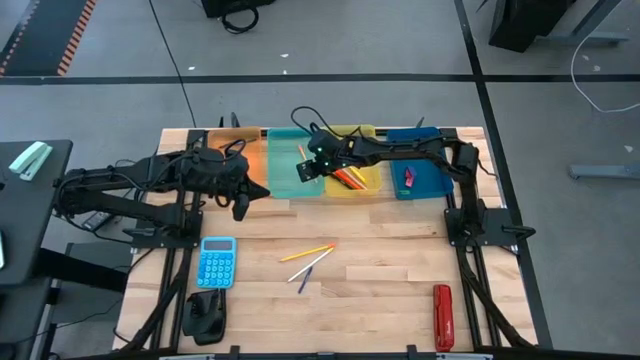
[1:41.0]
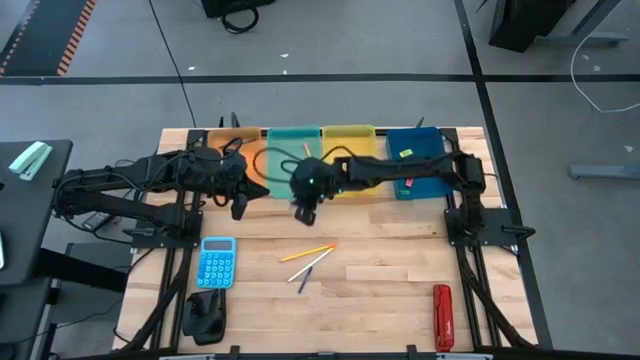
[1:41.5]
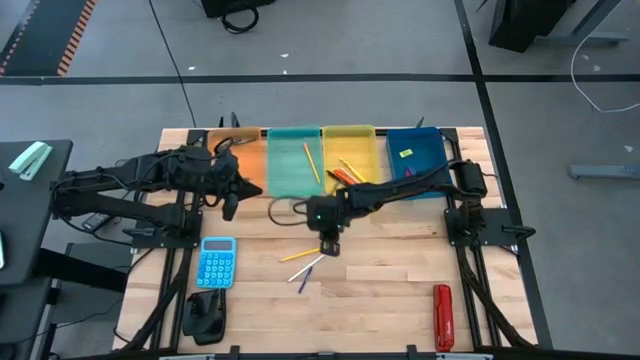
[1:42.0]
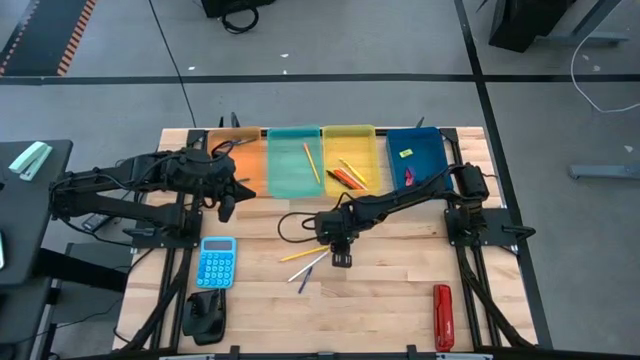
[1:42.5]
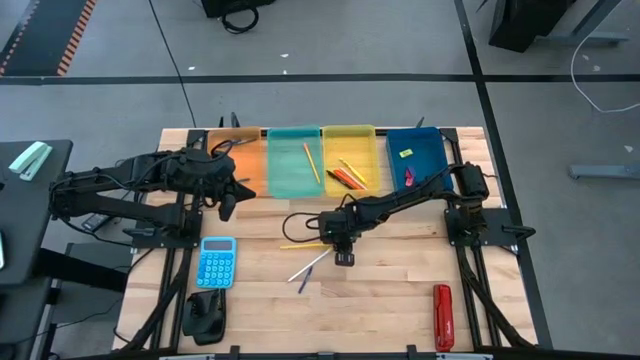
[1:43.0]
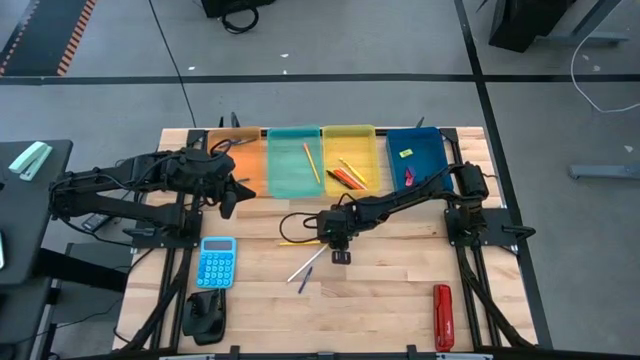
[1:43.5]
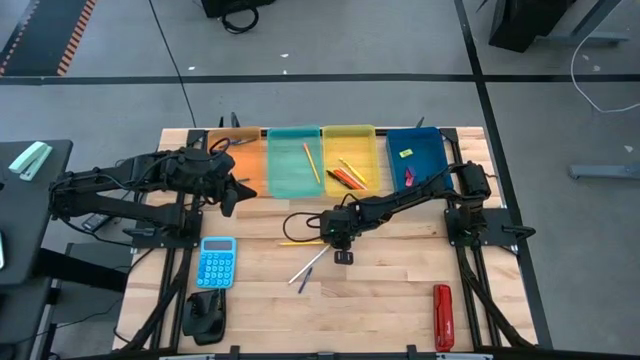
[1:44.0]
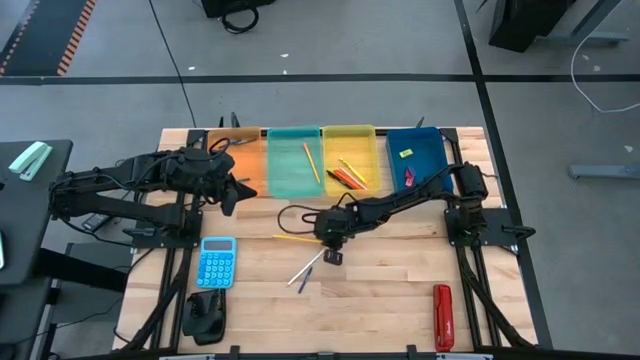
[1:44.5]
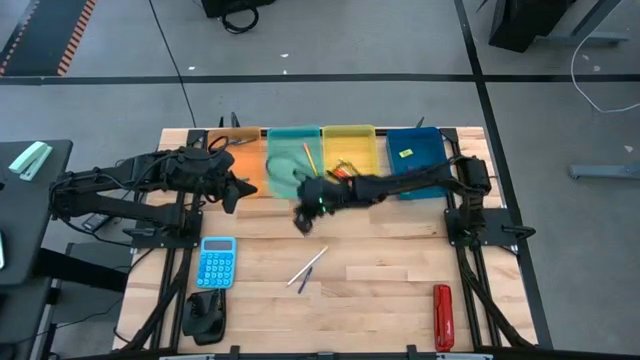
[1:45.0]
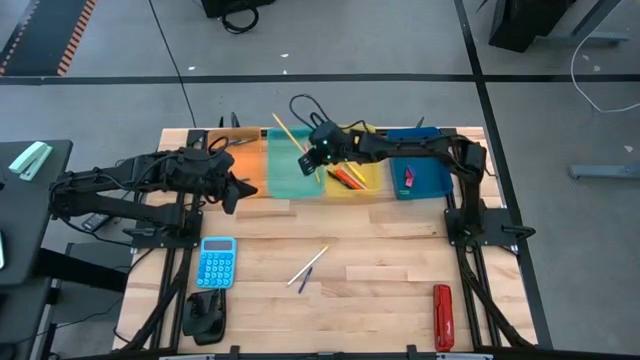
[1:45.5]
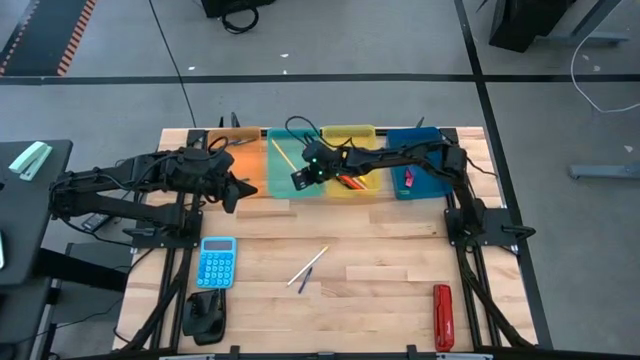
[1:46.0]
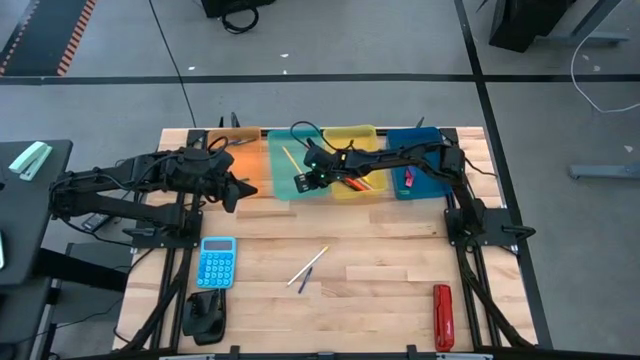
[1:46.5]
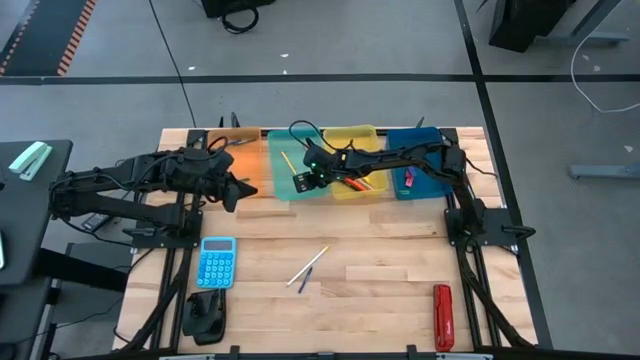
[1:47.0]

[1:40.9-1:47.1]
Task: Sort crayons/erasers/pens/pencils in bins
Put the yellow pencil into the green bin

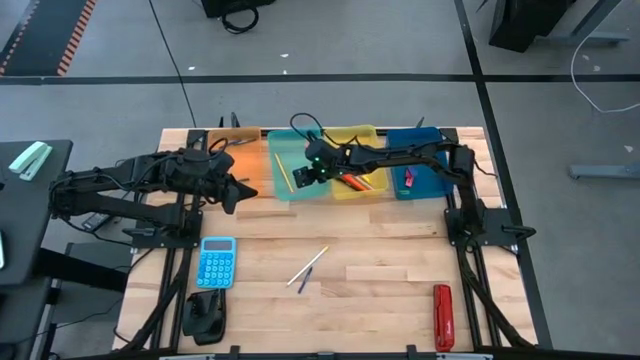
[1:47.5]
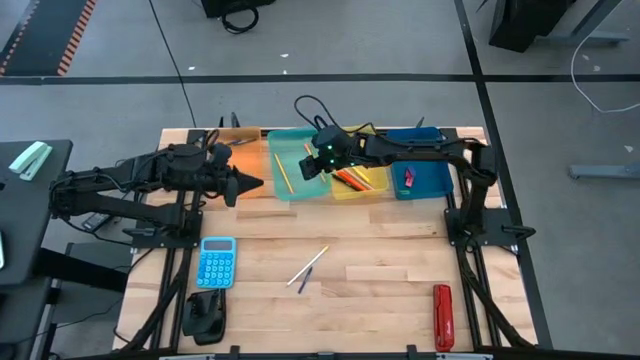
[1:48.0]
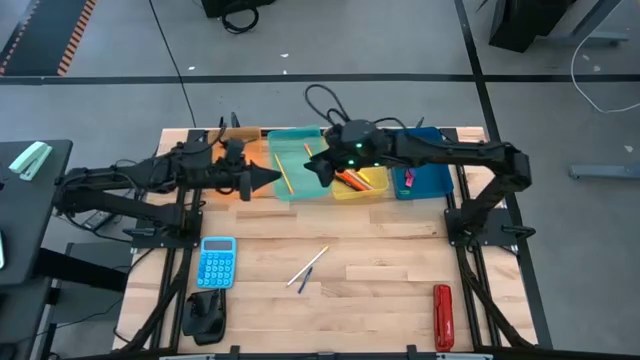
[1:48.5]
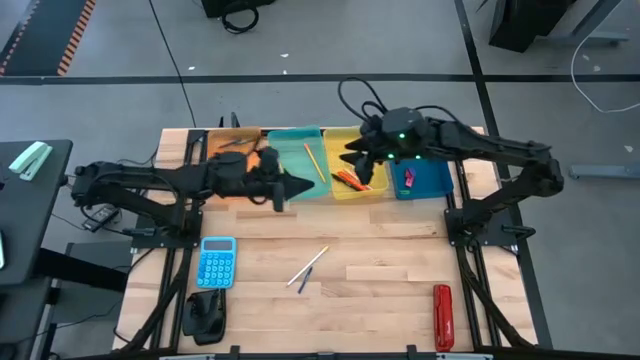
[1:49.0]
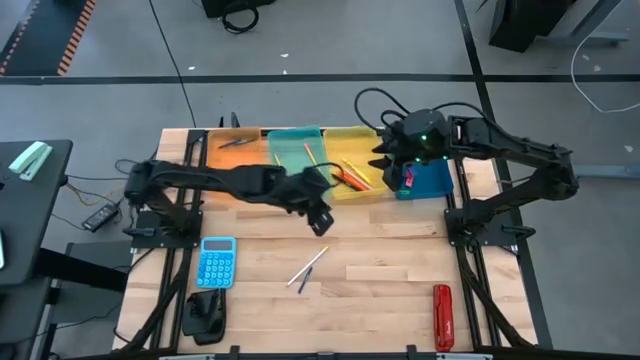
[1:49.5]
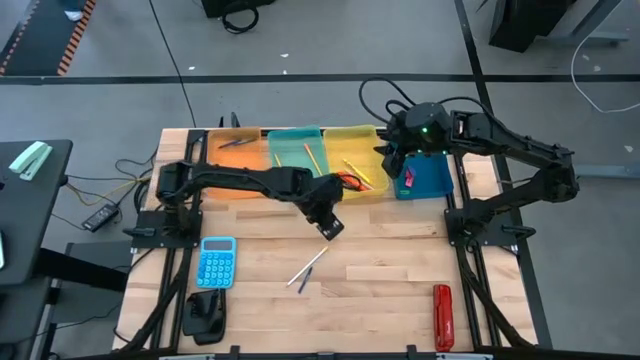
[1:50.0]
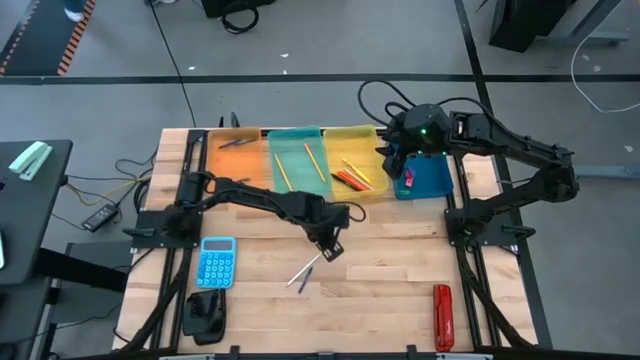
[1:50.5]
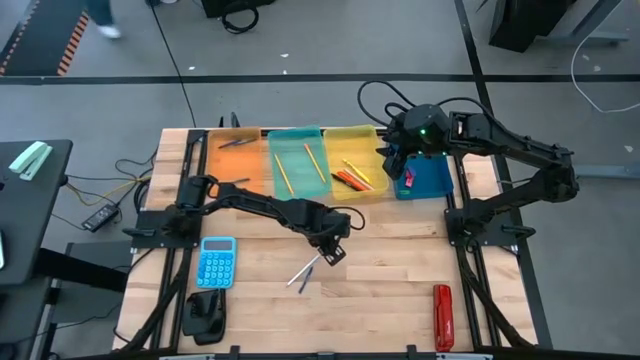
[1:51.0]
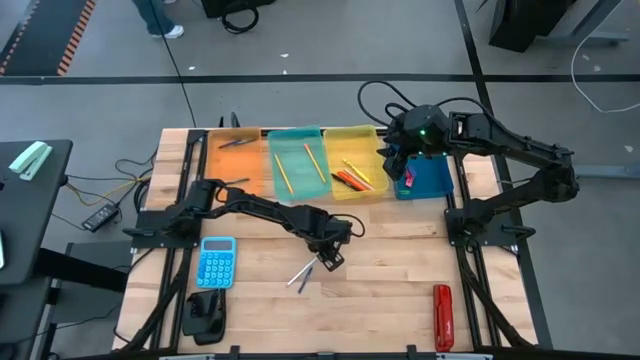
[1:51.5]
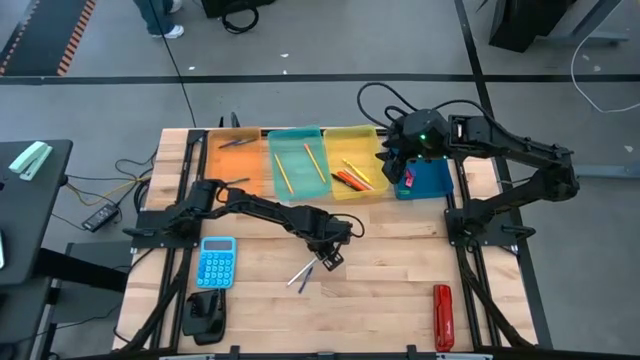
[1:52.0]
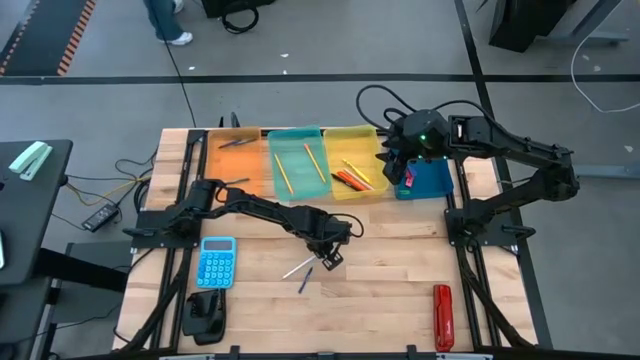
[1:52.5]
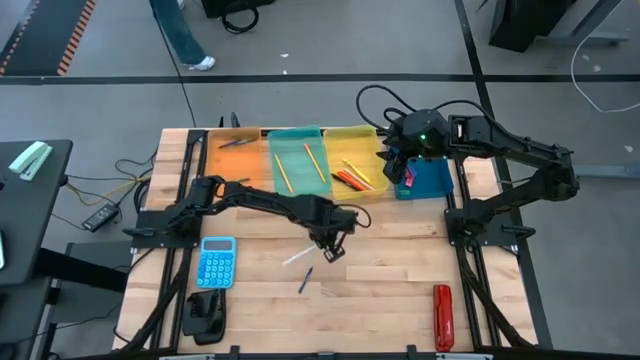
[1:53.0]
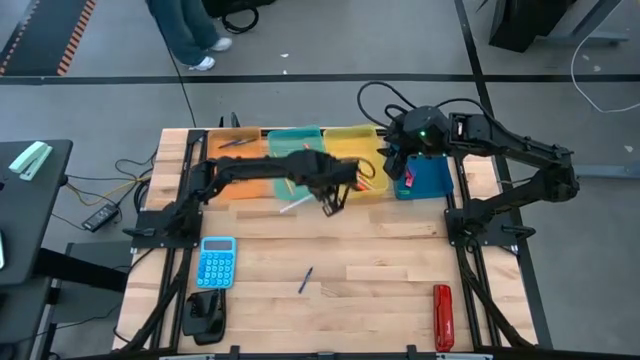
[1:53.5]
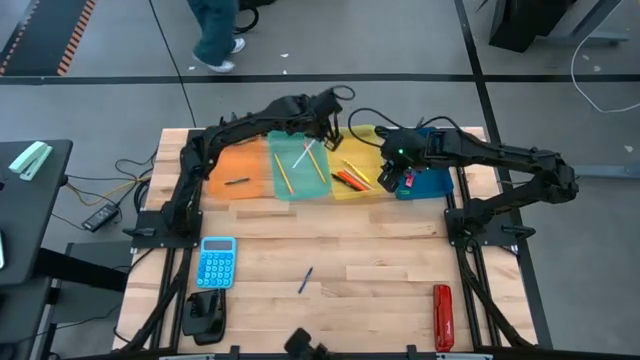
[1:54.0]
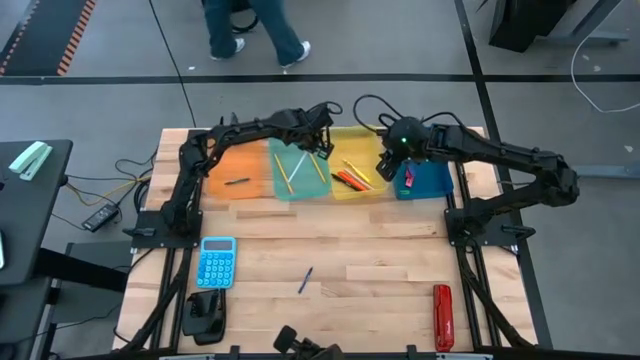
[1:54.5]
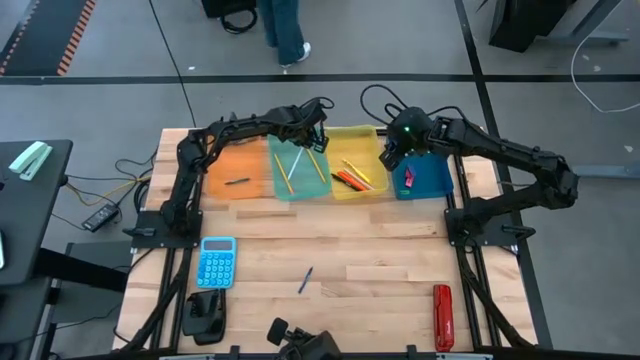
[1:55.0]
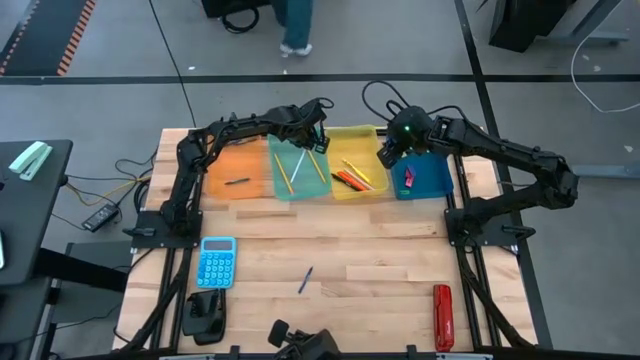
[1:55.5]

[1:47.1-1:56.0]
Put the white pencil into the green bin

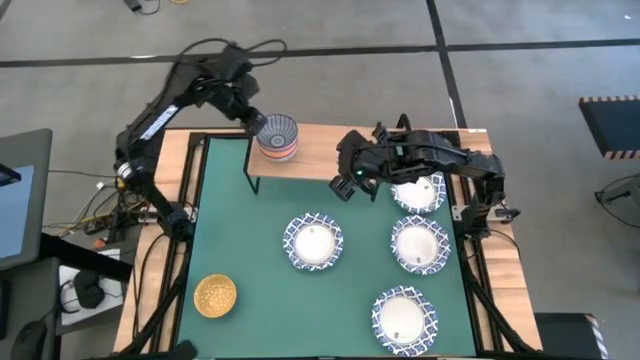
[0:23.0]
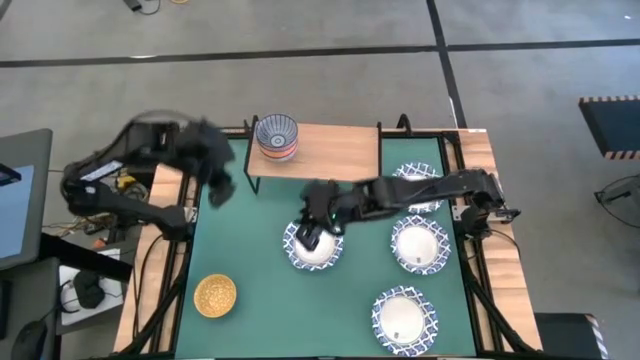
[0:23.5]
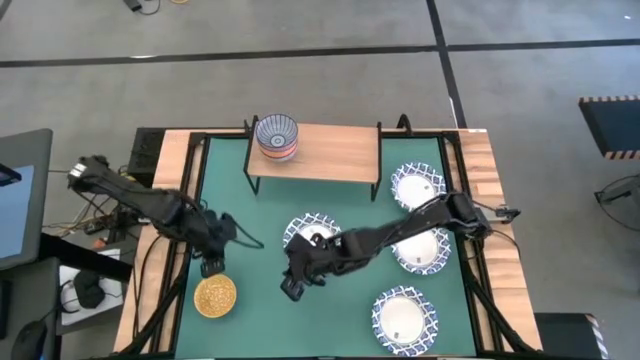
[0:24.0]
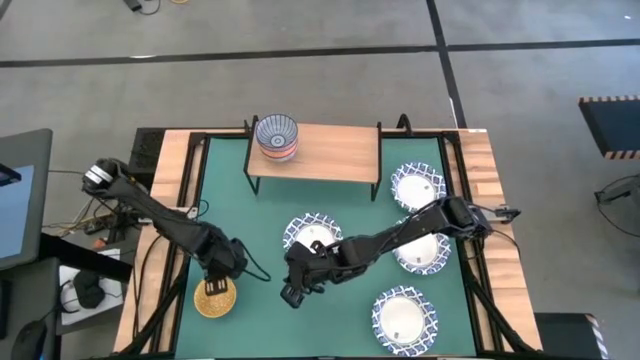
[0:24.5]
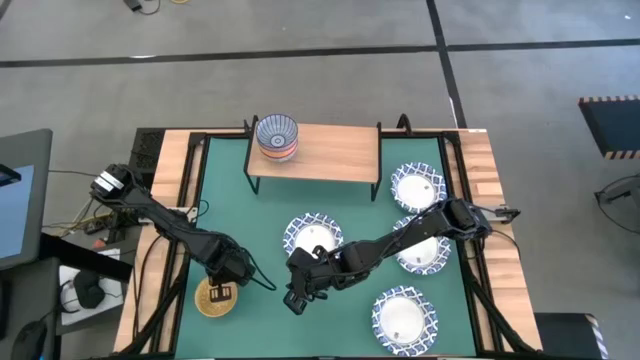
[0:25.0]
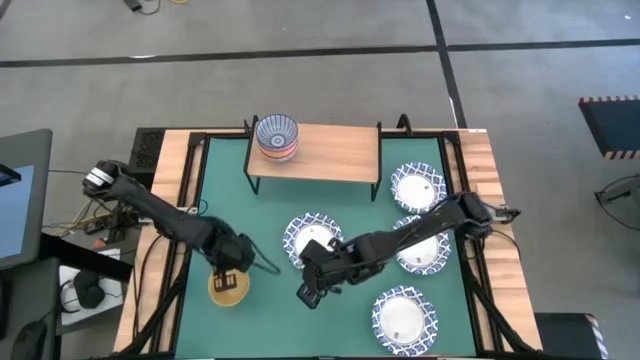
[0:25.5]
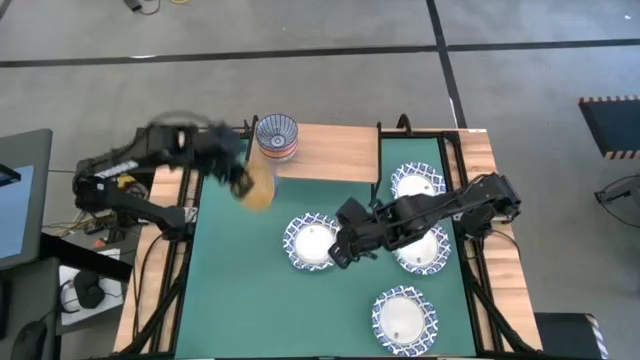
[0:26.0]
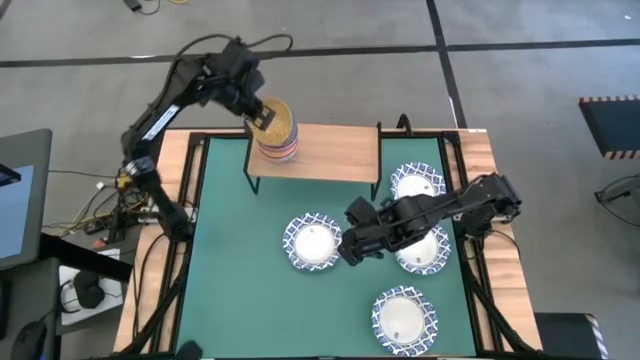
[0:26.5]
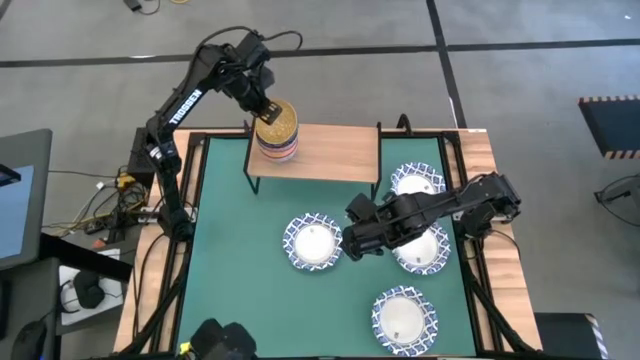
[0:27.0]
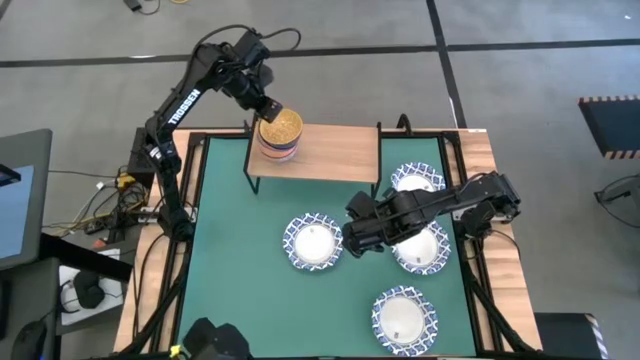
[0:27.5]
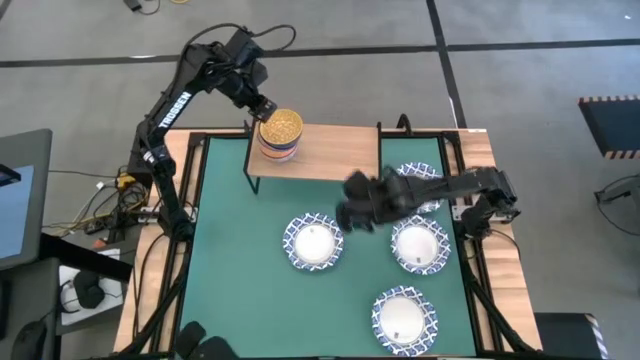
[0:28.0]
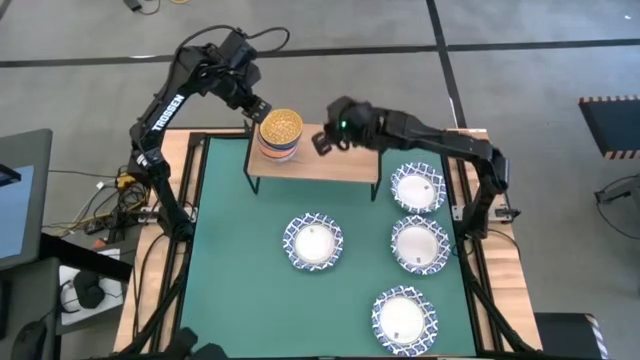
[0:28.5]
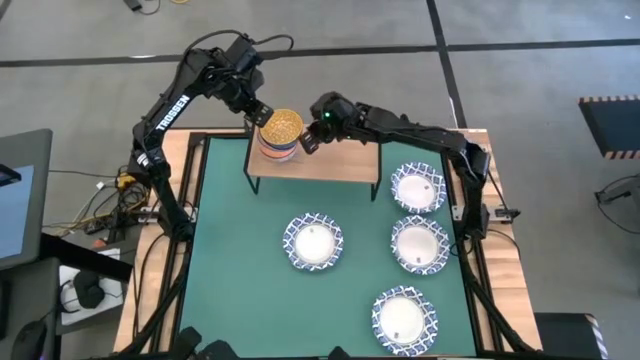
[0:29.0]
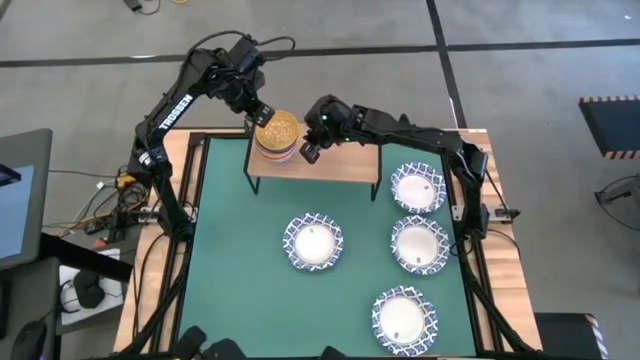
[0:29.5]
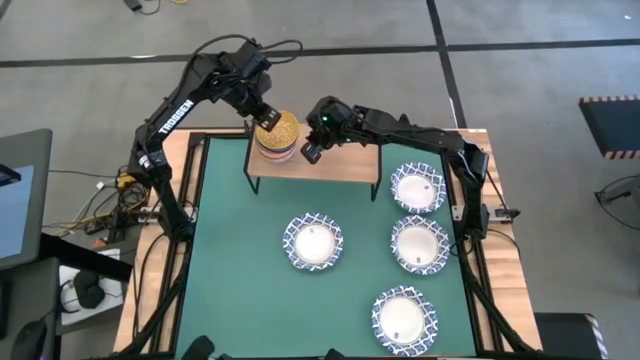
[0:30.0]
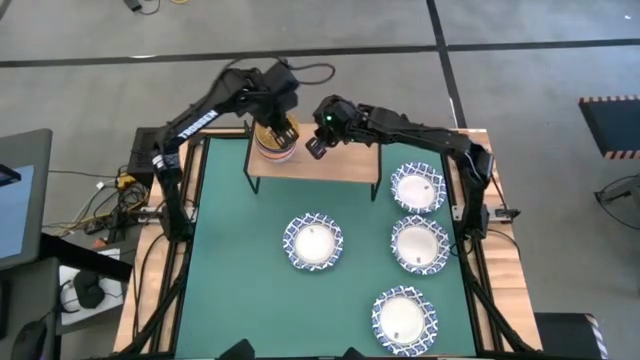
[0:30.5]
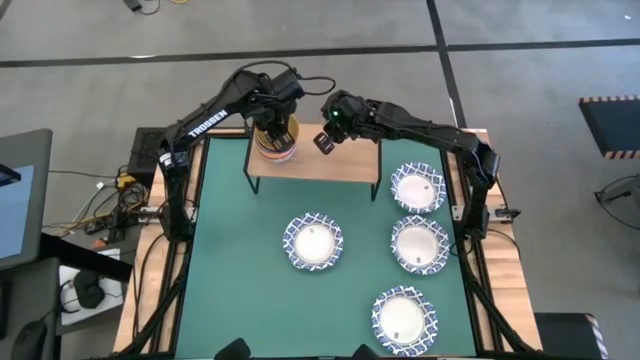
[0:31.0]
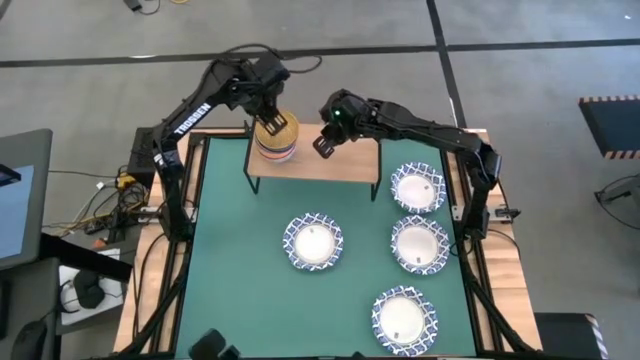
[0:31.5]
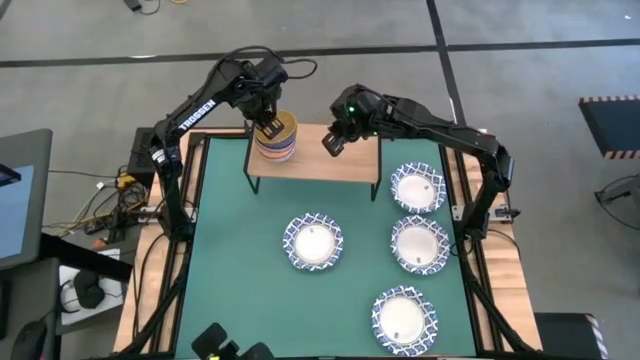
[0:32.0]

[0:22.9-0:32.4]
Task: Place and stack bowls onto a shelf
Stack the yellow patterned bowl on top of the blue patterned bowl on the shelf
